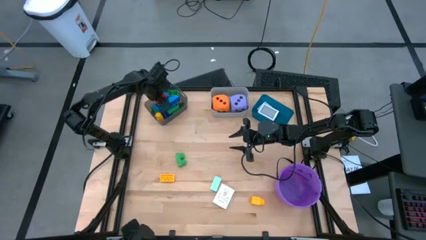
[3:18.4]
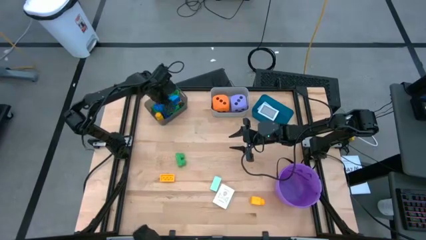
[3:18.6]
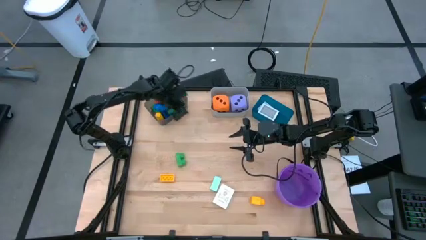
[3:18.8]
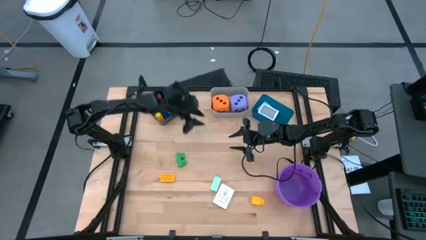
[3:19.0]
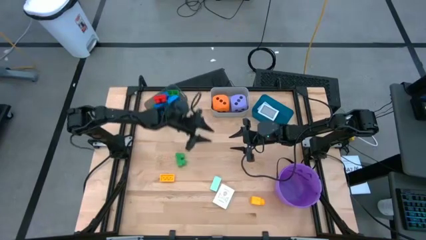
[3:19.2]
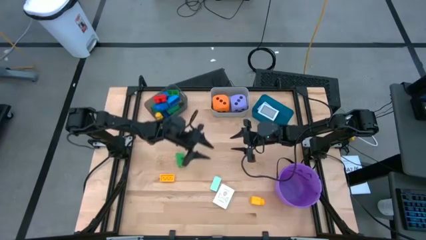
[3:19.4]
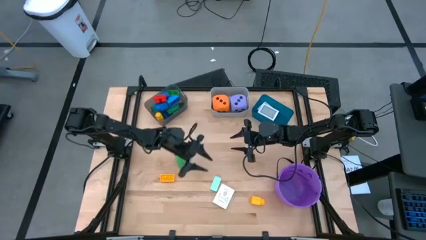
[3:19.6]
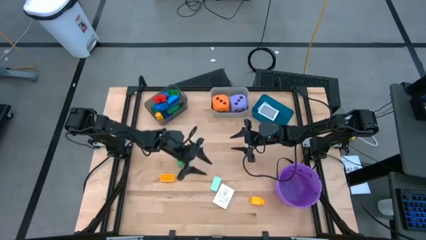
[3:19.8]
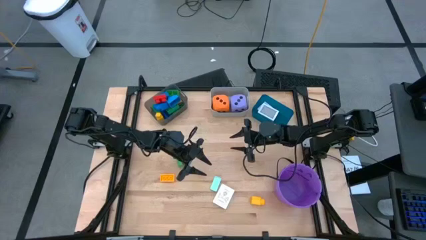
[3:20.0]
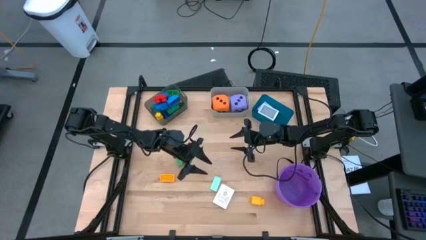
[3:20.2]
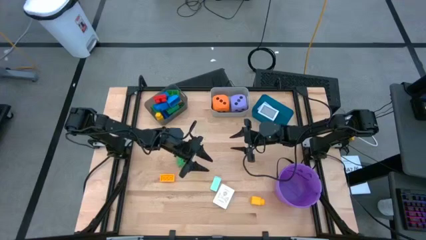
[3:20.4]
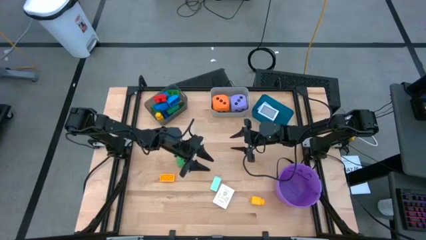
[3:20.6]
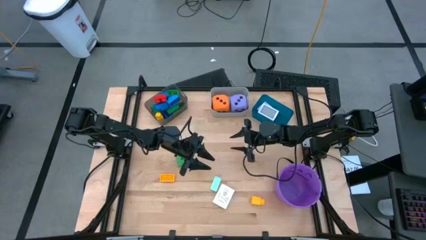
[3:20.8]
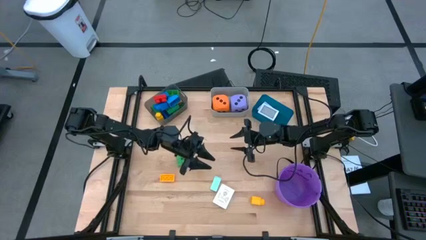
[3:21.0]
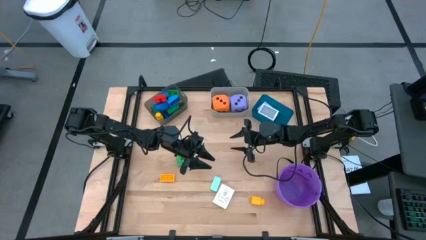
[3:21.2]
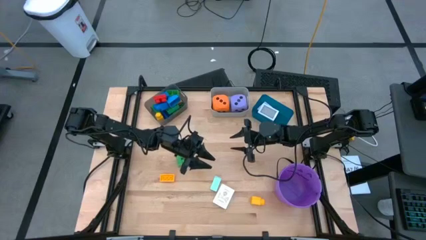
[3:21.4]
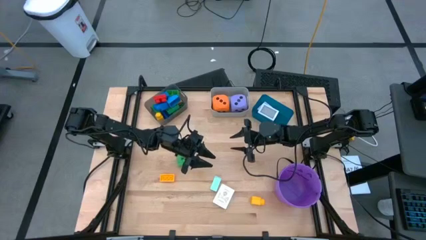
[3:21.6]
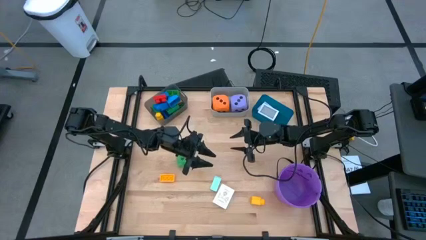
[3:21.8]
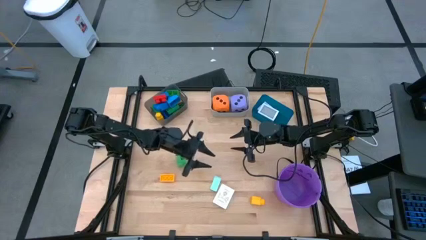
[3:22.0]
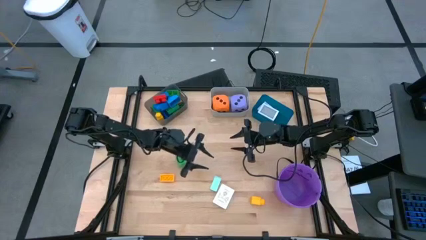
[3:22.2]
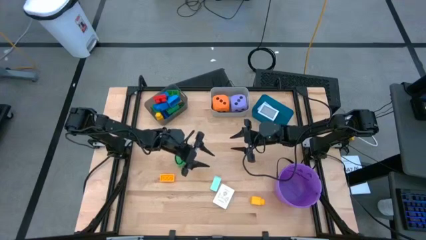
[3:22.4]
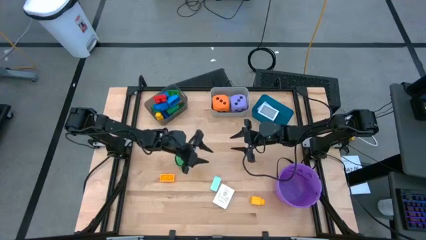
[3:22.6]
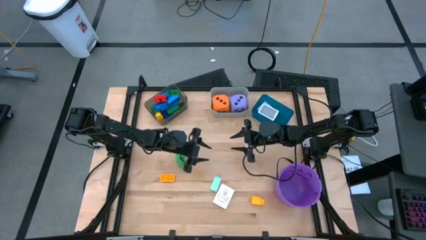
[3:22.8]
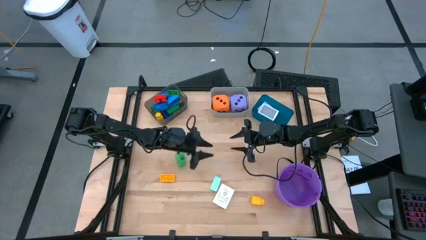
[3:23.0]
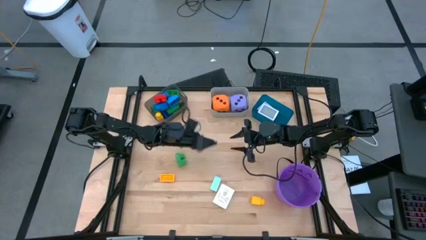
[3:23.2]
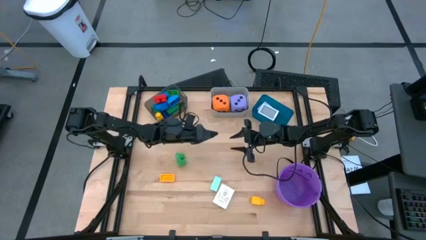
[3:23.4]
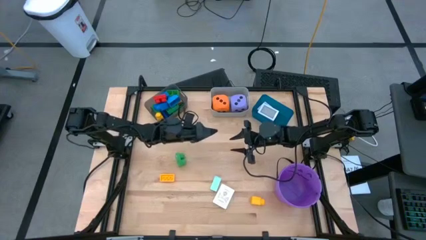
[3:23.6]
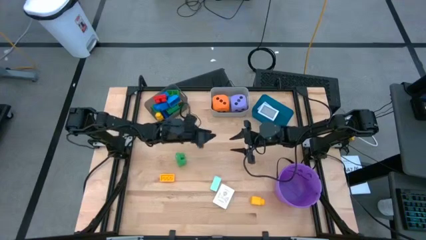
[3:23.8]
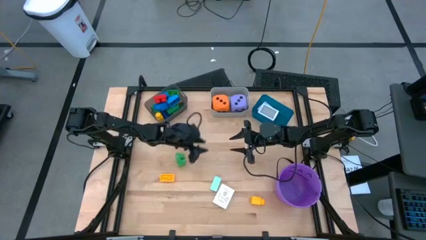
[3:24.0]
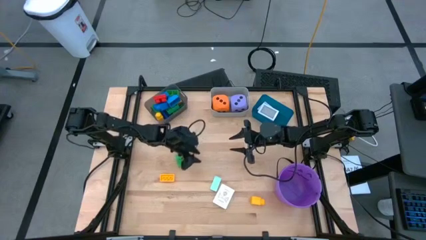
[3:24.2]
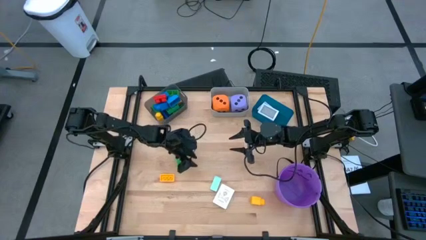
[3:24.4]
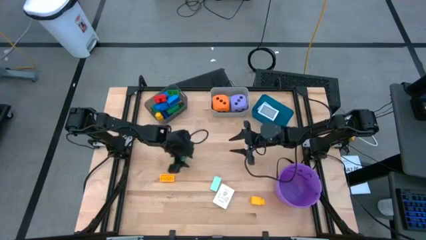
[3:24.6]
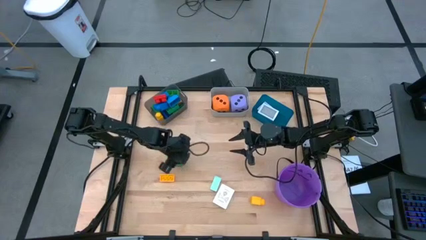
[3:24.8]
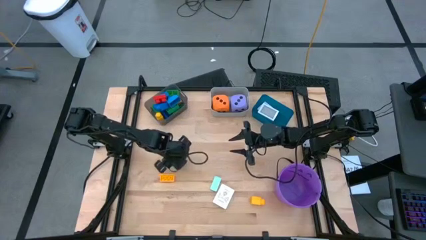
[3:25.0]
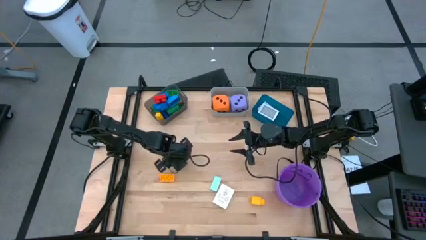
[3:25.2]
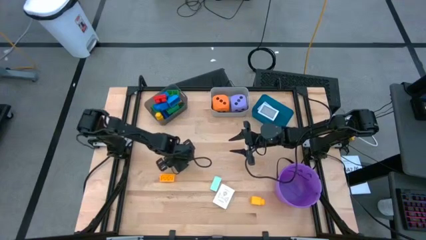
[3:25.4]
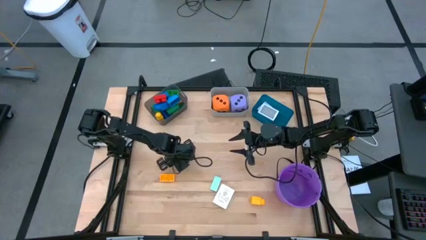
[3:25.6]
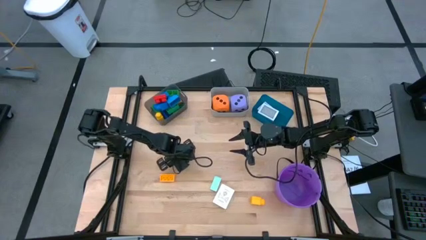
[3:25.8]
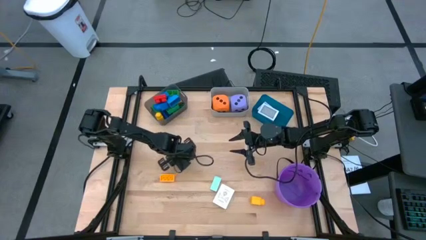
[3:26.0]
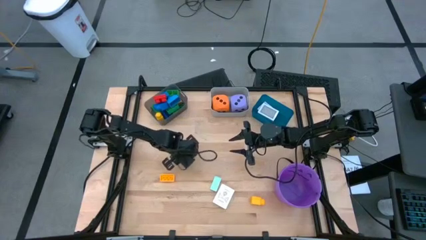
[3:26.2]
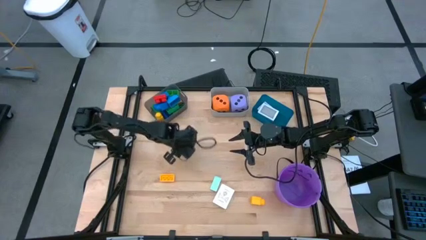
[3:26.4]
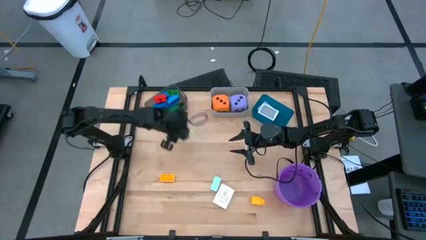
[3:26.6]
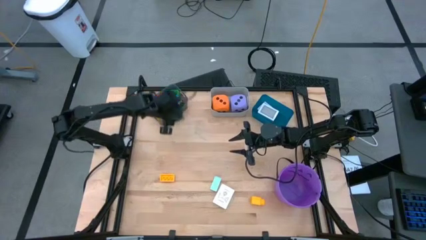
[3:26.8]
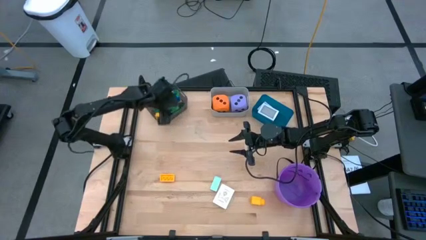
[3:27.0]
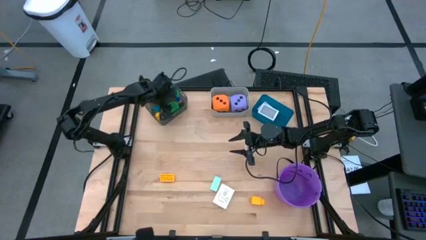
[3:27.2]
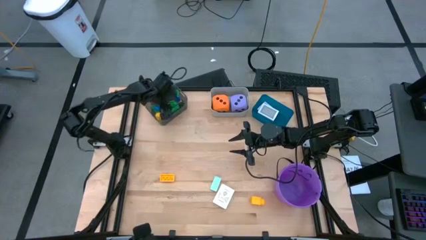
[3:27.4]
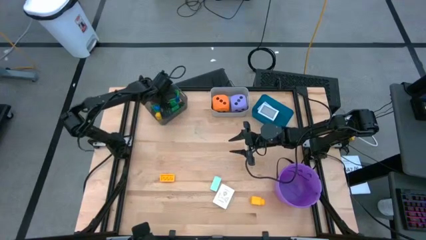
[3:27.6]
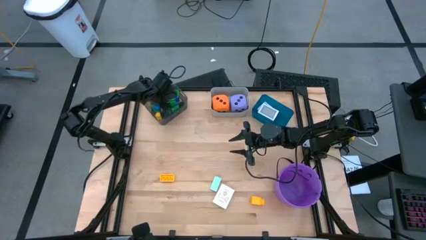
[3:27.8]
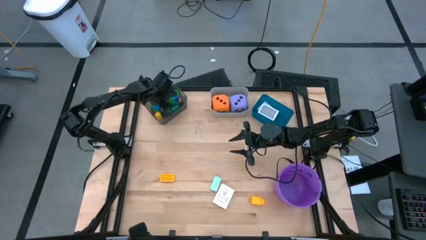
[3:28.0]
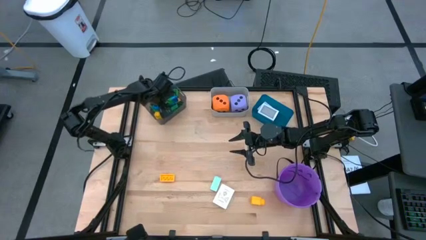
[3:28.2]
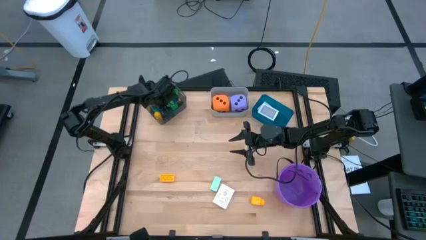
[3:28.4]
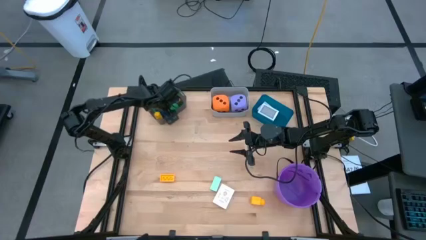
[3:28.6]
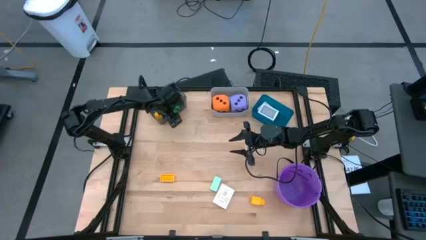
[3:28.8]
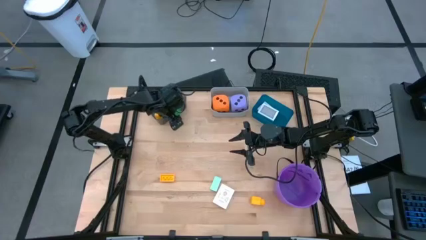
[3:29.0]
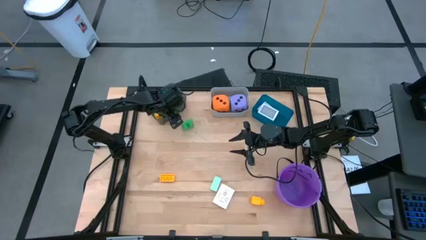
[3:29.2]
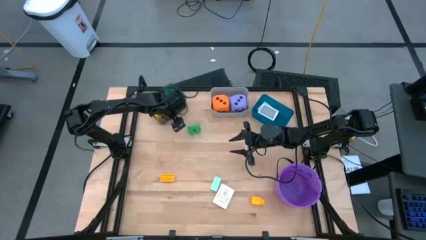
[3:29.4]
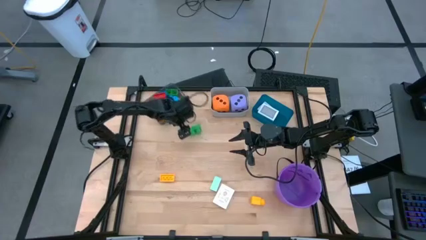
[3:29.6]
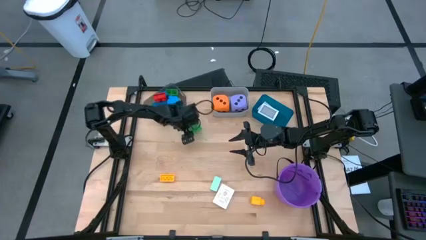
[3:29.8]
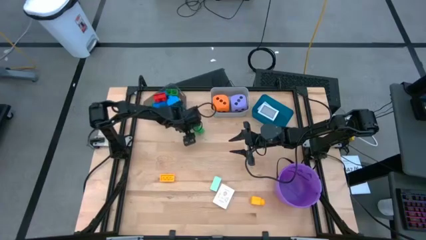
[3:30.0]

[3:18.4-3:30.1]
Task: Pick & Place Toys
Put the green gamepiece into the black bin

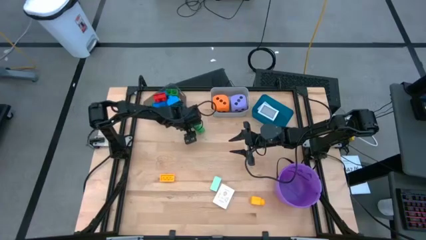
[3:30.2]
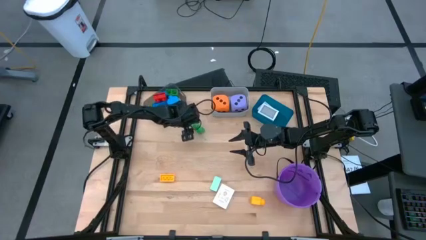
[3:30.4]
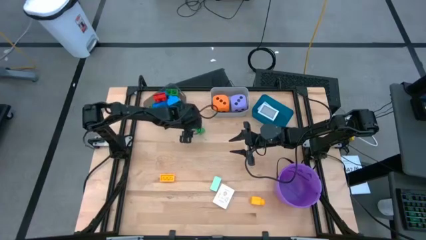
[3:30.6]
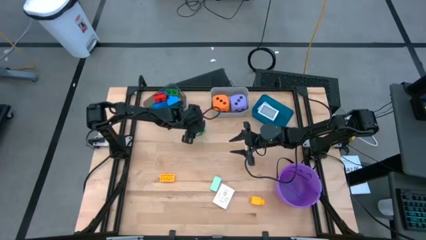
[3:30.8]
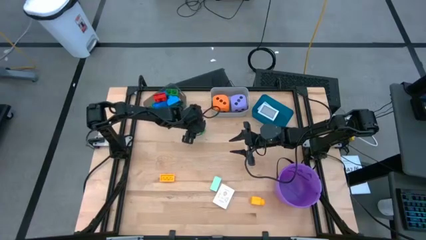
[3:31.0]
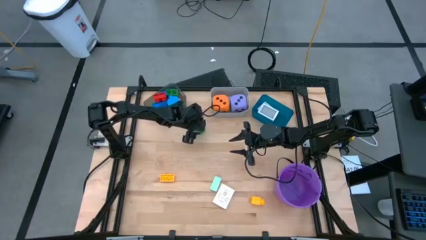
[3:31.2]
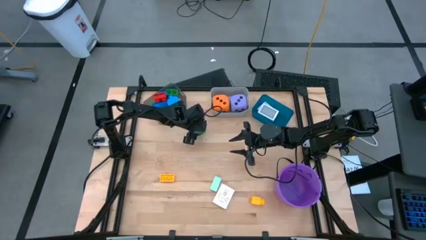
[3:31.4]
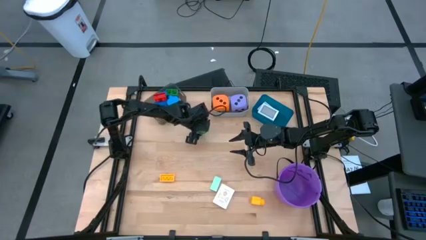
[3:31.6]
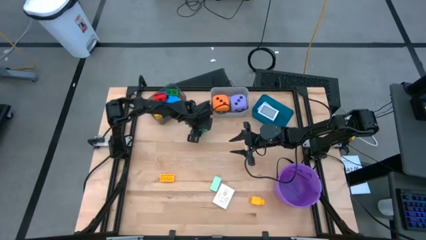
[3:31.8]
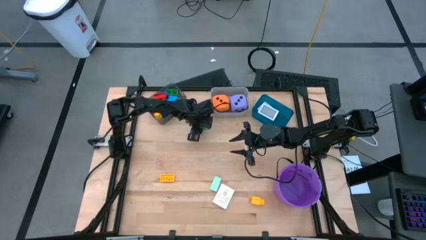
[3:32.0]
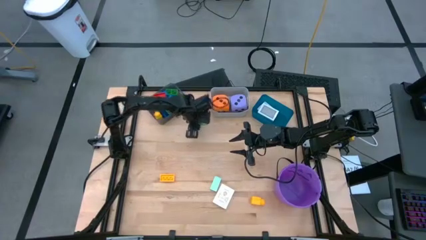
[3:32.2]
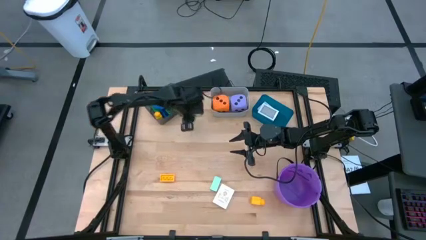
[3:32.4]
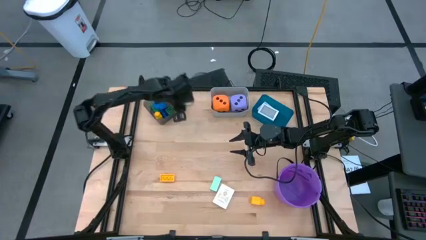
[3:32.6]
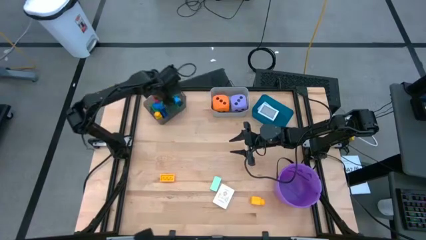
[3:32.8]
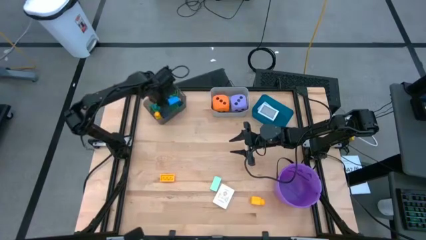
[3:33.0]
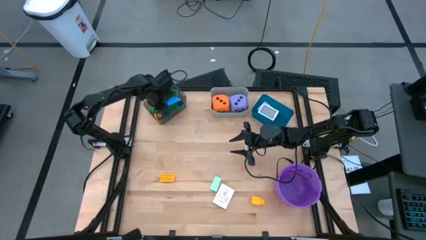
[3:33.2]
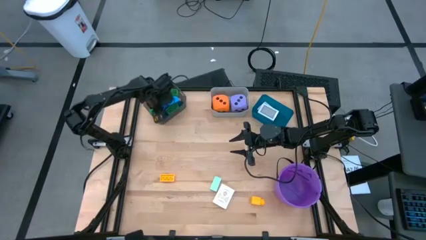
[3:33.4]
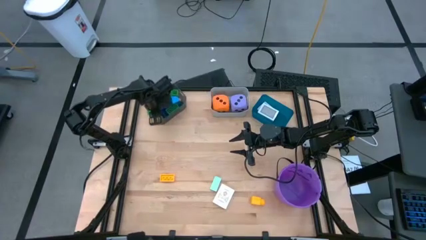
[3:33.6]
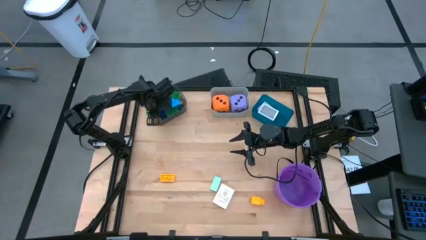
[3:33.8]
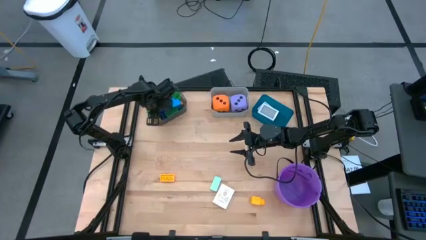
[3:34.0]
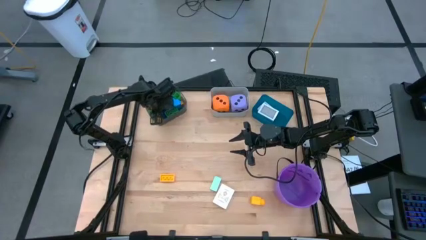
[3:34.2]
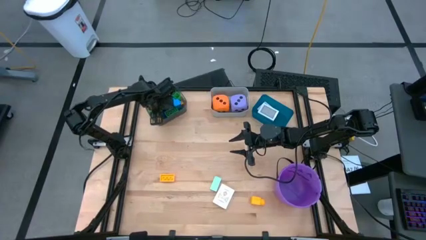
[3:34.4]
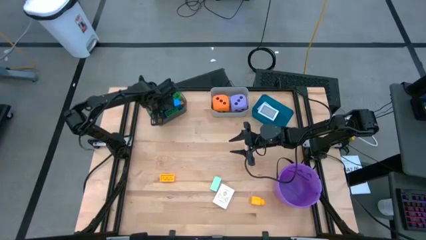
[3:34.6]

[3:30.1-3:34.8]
Put the green gamepiece into the black bin
